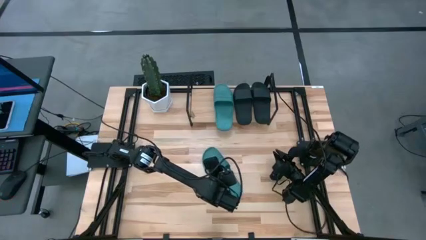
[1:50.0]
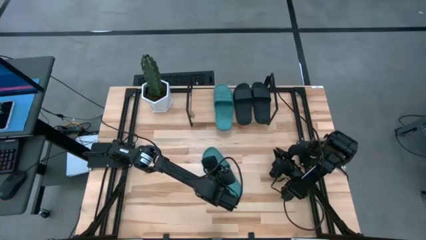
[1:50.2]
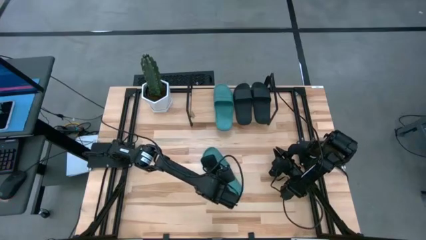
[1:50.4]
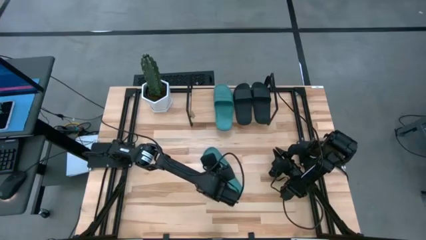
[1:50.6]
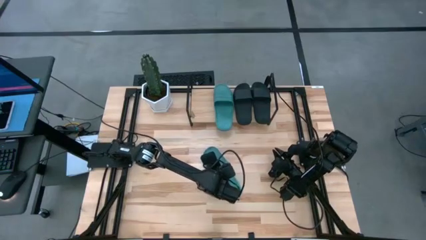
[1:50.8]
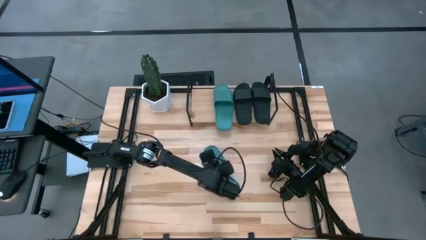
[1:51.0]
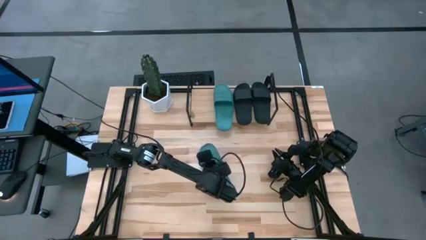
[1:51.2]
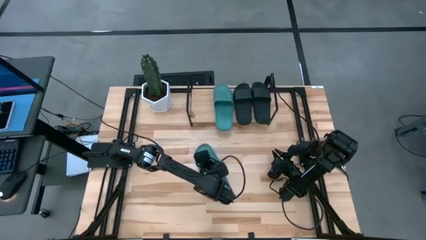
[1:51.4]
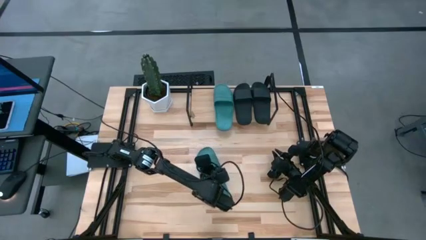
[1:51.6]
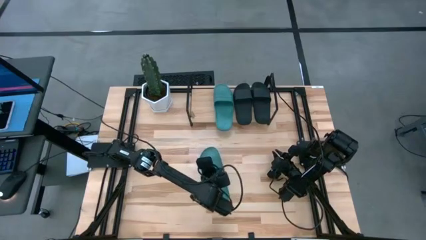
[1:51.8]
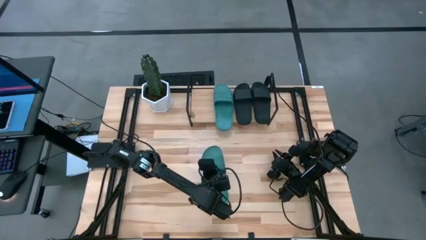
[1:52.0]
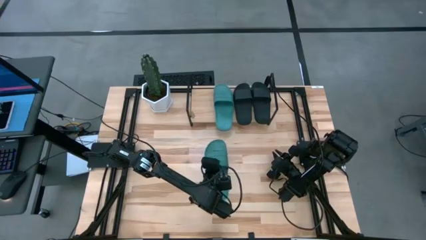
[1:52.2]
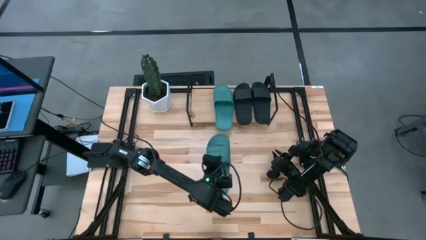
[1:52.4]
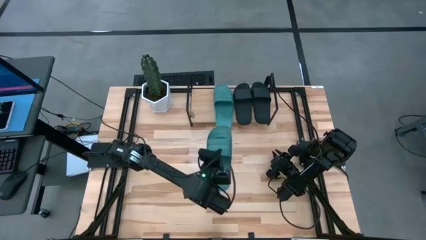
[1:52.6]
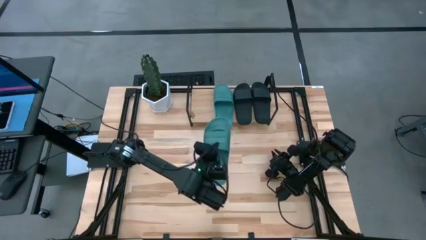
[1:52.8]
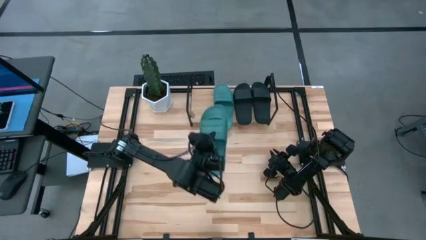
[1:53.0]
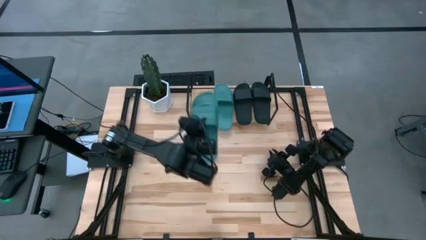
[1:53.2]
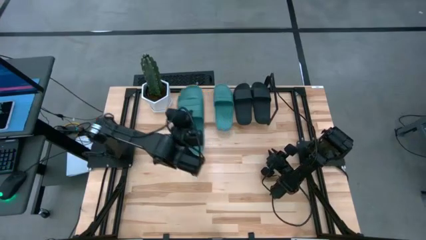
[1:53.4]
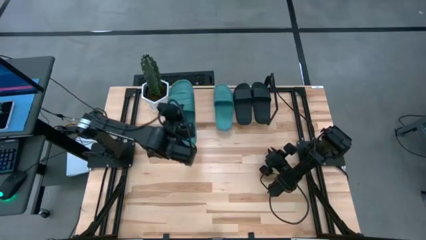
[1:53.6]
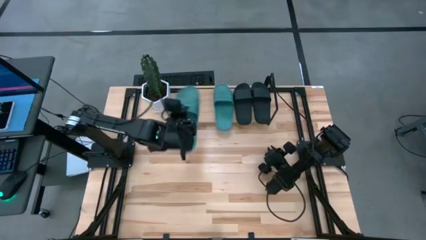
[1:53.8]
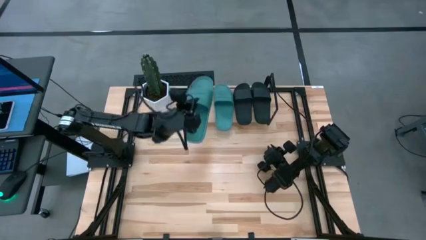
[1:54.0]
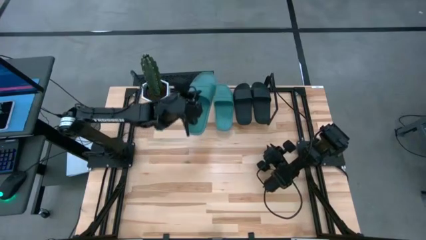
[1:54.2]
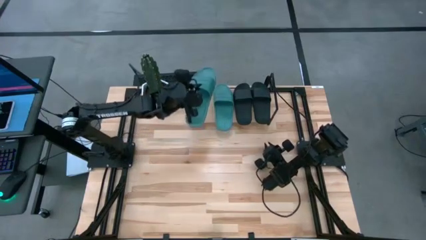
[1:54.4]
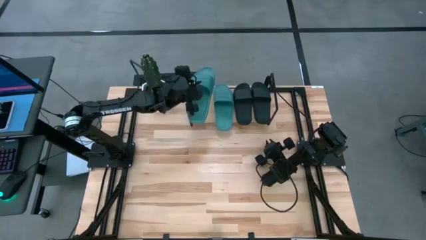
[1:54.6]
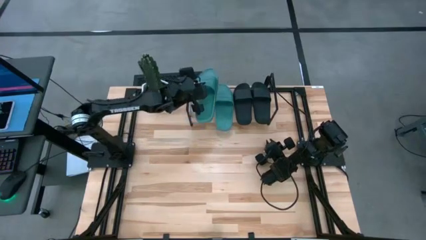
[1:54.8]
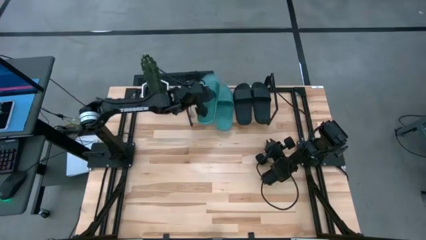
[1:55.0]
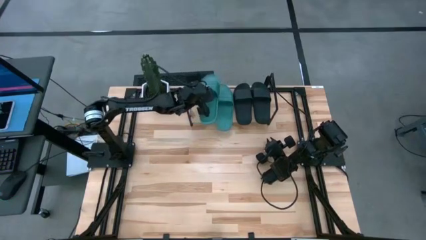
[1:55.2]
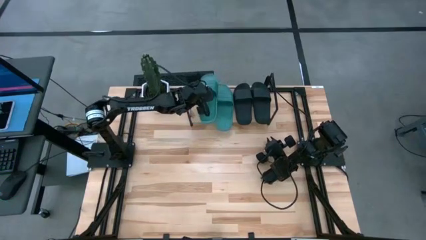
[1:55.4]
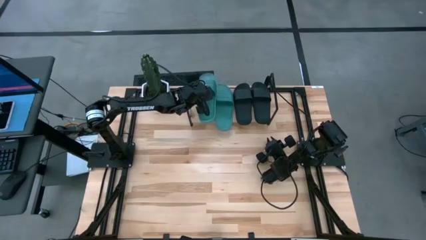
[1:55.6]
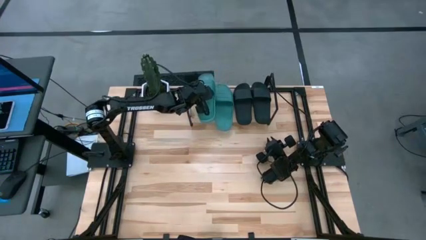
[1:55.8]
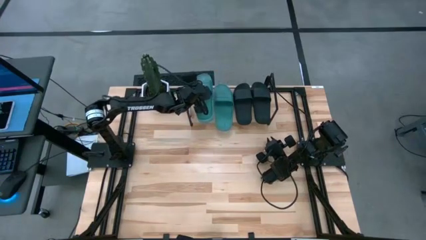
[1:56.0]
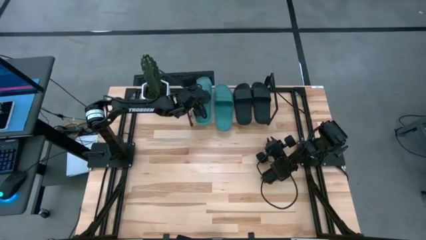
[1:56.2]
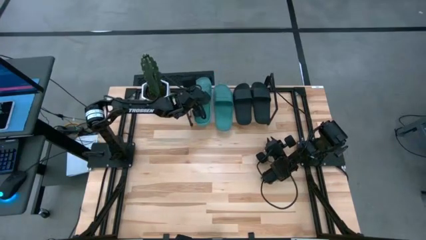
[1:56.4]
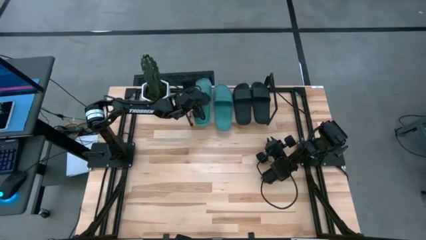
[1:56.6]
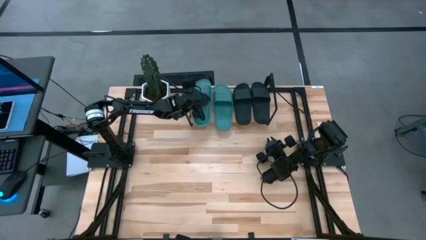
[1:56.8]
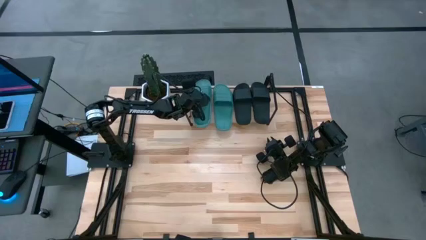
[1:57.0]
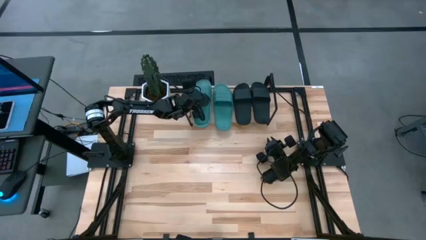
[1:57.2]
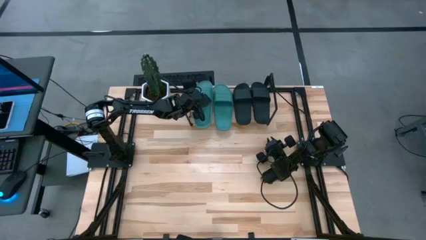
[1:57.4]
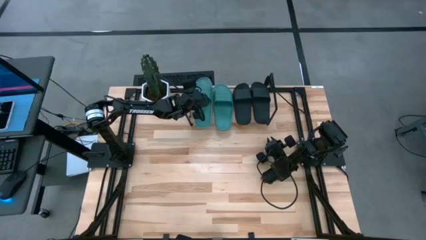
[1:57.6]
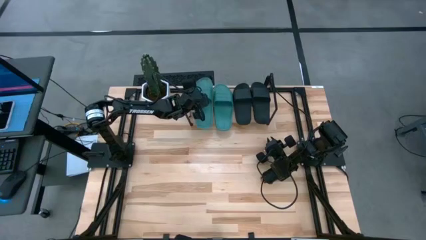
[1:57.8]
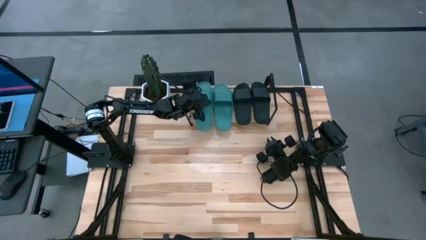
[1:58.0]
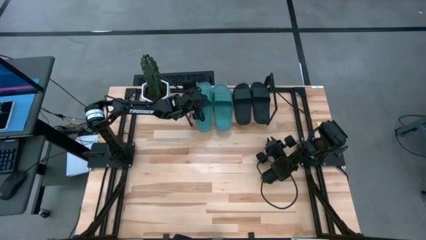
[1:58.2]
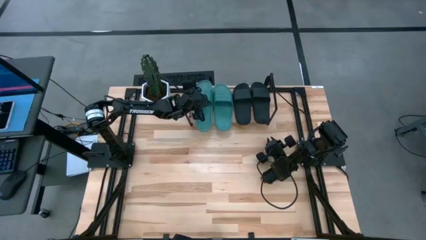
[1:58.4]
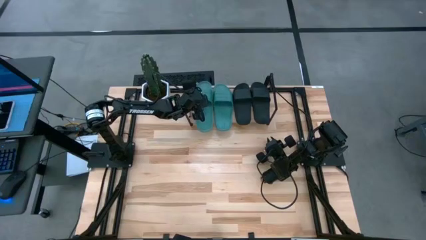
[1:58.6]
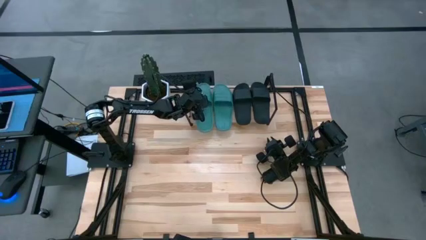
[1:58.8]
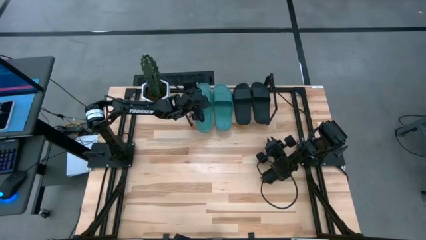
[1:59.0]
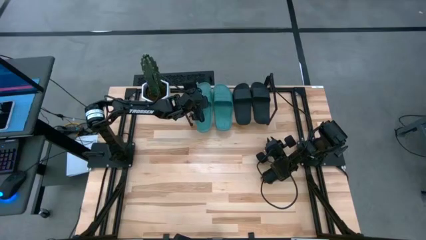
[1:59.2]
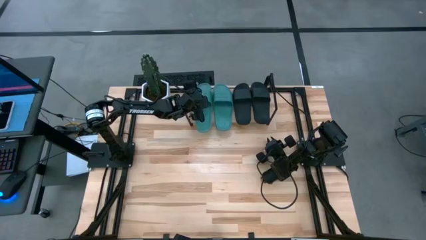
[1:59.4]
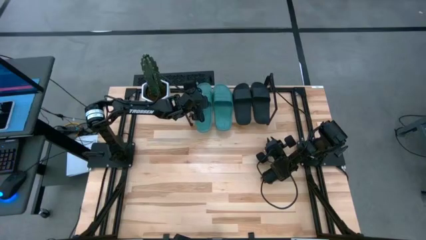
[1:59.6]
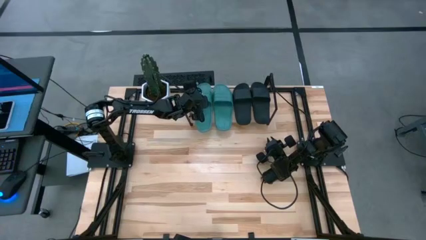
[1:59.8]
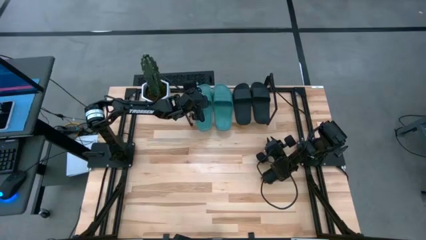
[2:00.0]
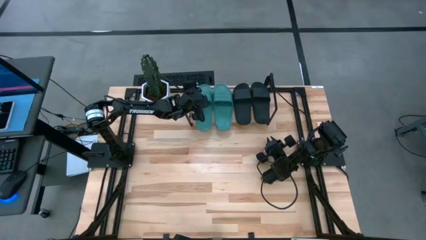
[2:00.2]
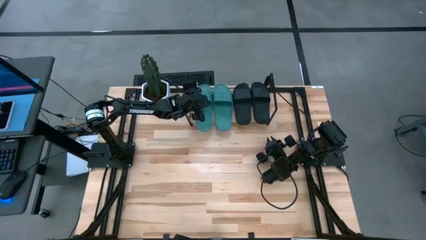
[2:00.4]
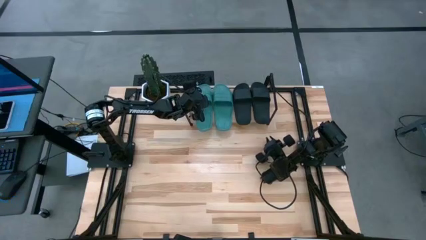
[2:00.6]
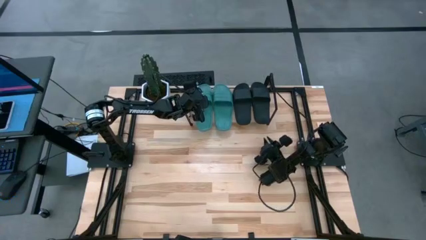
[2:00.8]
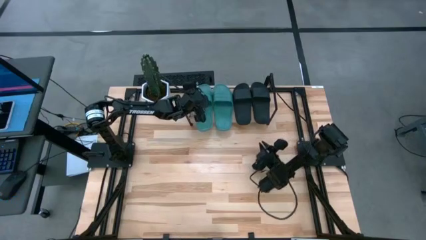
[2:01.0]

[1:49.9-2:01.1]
Task: Pick and place slides into the shelf
Put the green slide on the shelf
